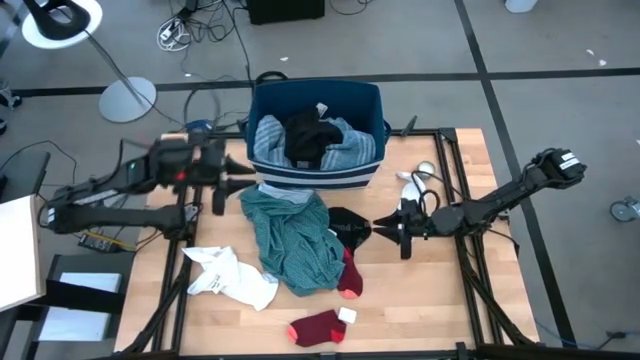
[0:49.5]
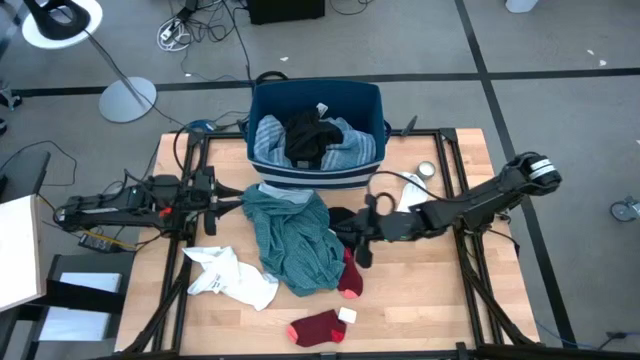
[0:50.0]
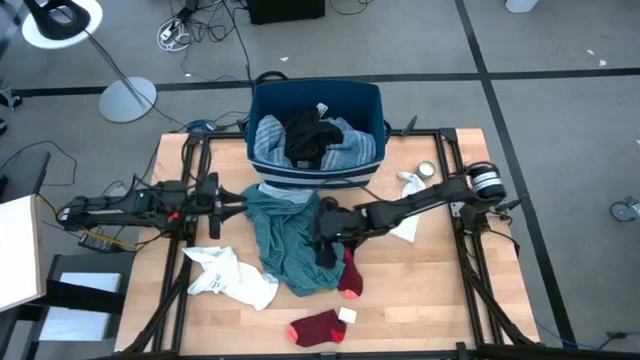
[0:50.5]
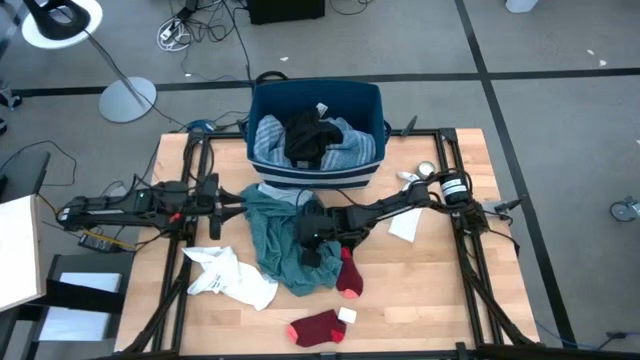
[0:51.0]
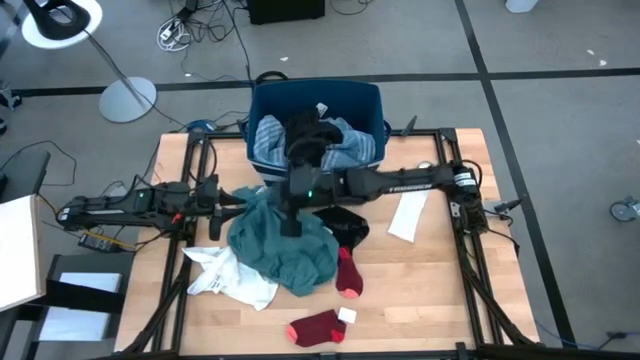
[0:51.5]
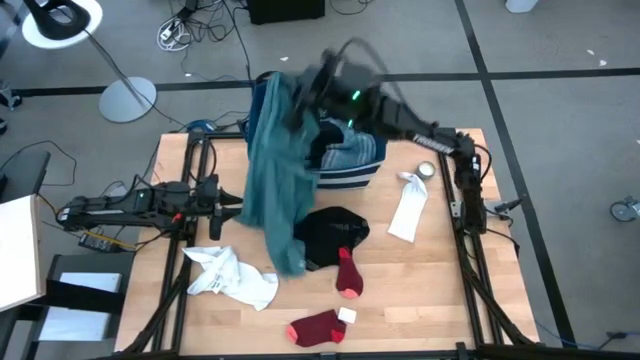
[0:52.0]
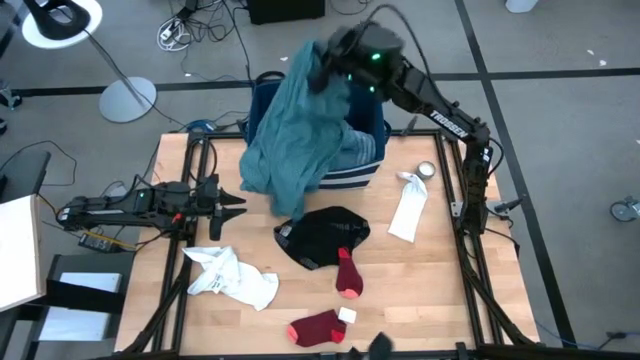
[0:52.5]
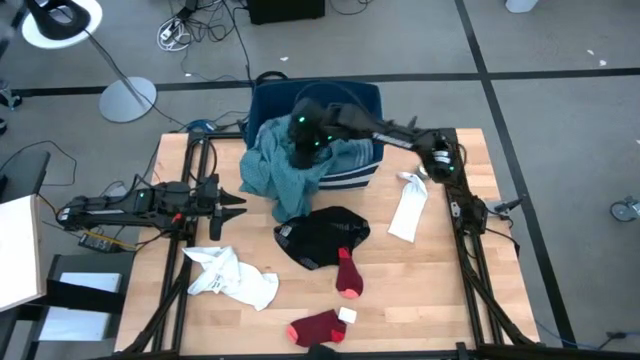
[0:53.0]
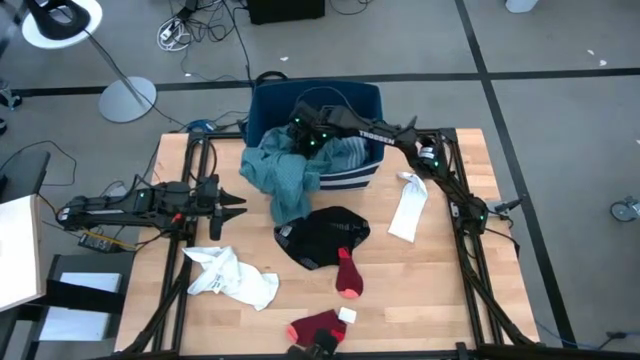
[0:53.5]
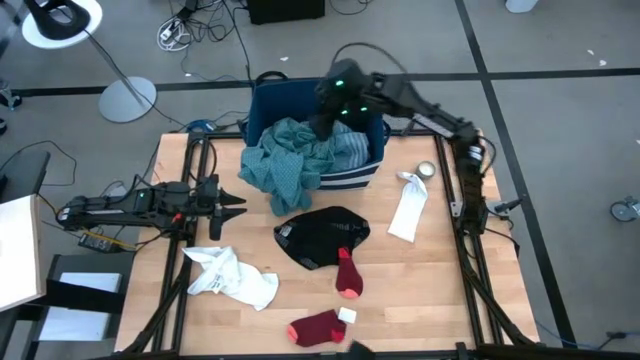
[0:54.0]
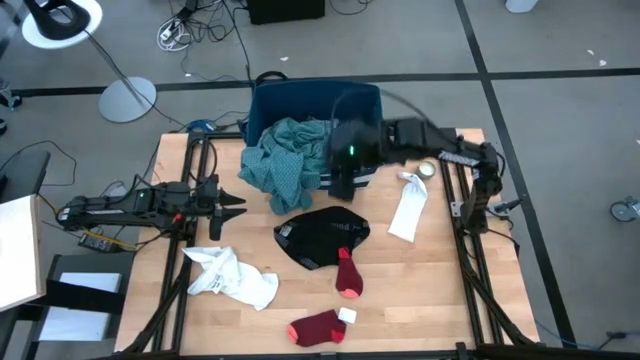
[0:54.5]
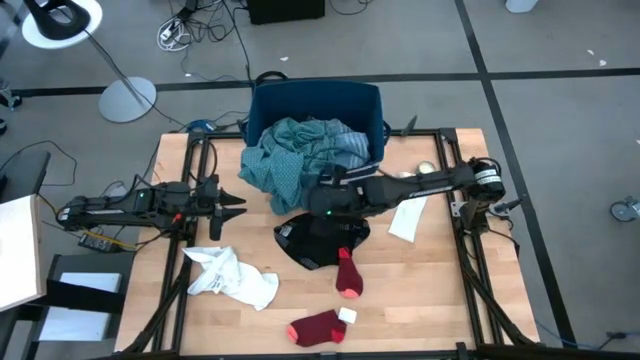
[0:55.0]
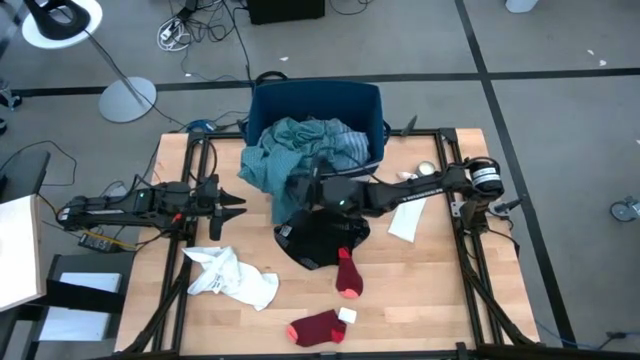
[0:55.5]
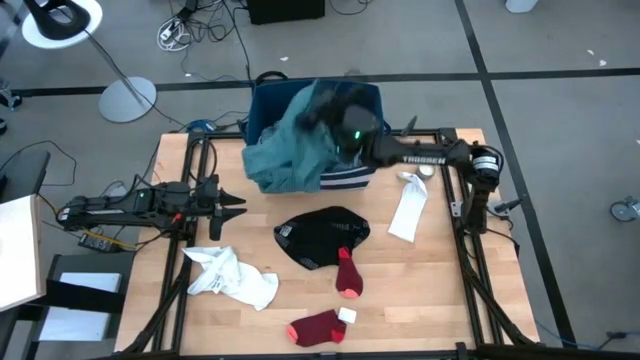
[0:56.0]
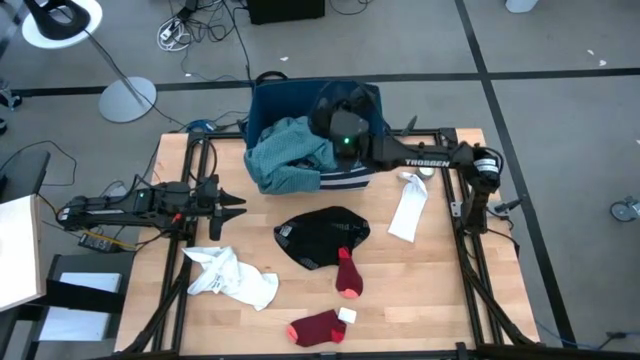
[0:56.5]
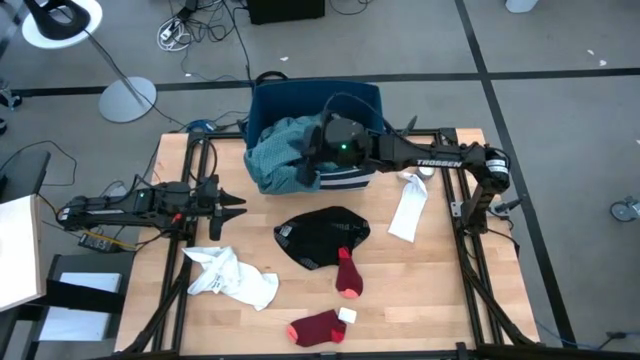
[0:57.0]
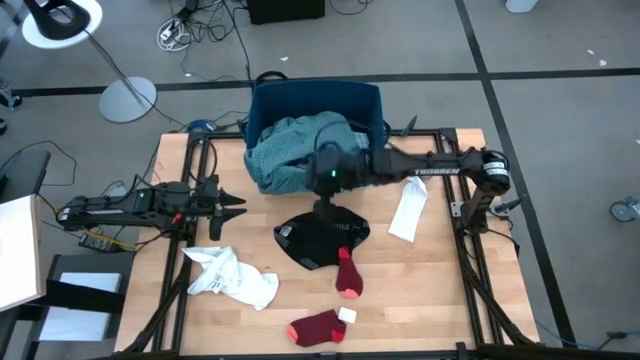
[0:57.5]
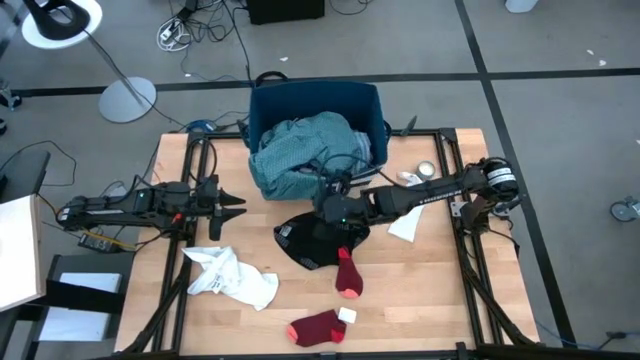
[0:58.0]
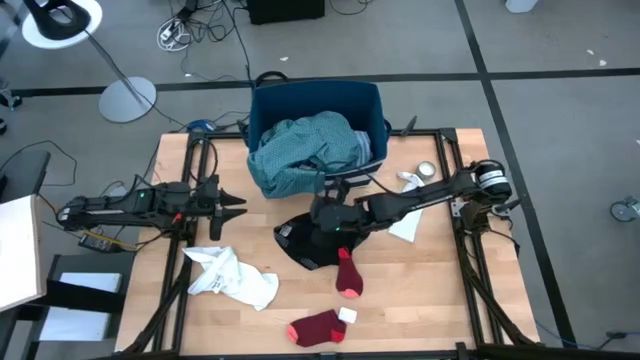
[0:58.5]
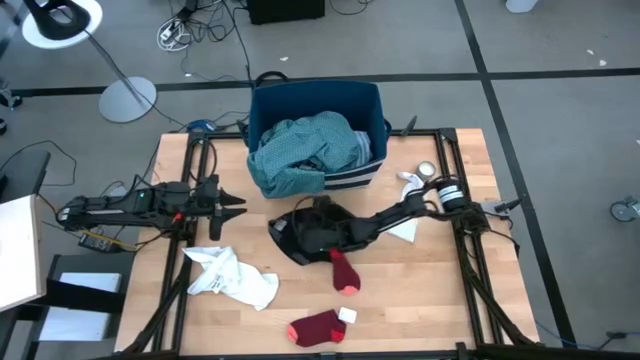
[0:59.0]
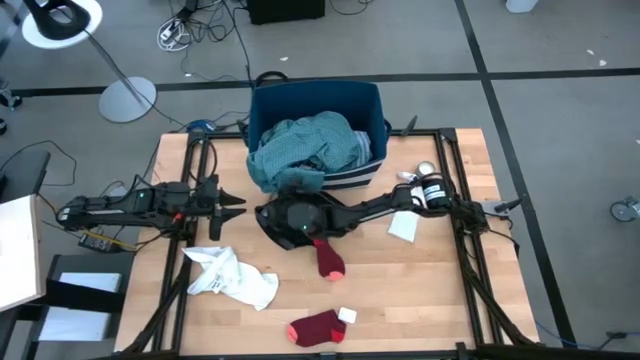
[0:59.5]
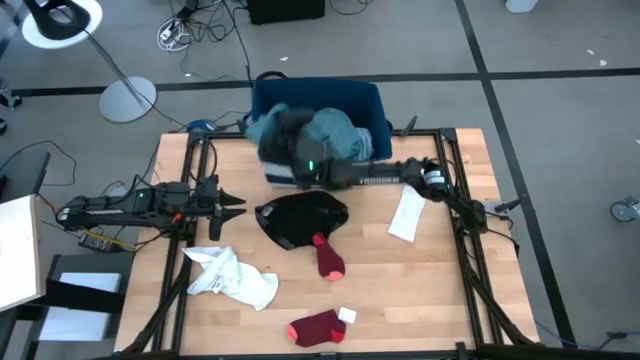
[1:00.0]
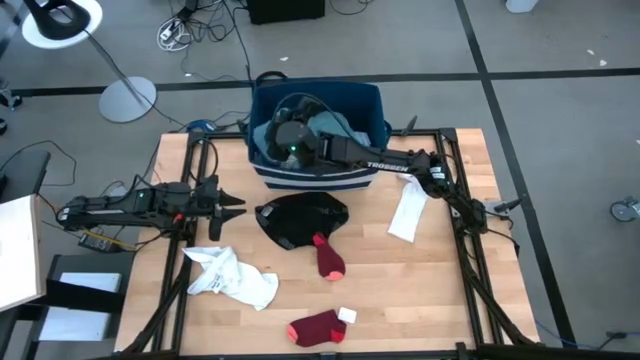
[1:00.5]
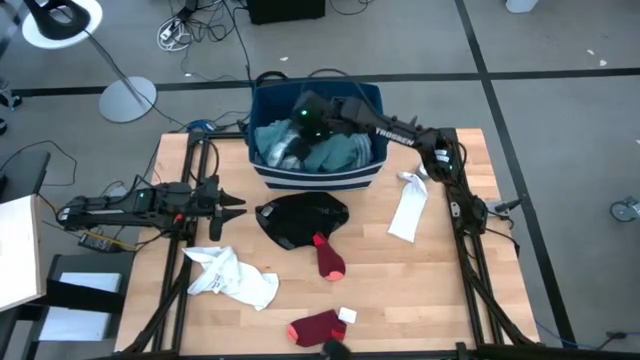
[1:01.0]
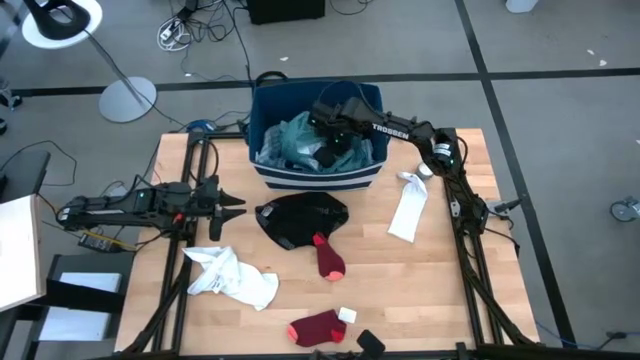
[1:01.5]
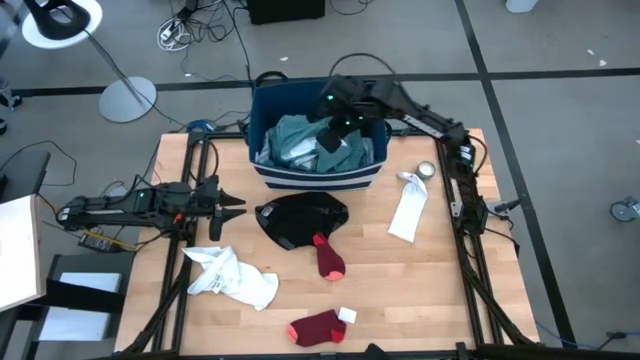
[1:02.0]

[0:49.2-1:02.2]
Task: Sort clothes
Put the green shirt into the blue laundry bin

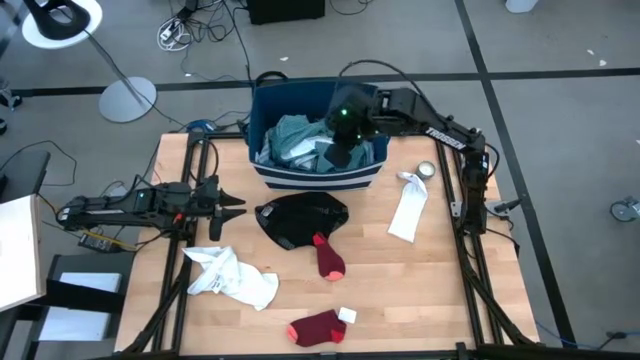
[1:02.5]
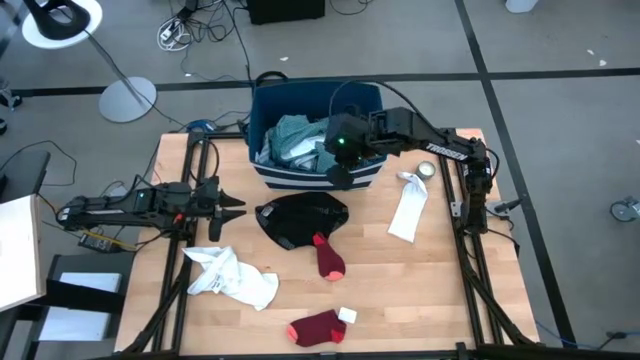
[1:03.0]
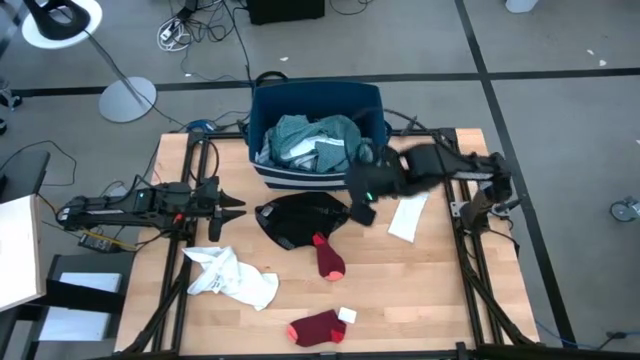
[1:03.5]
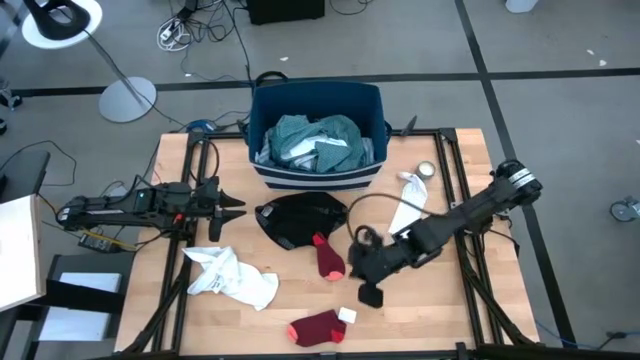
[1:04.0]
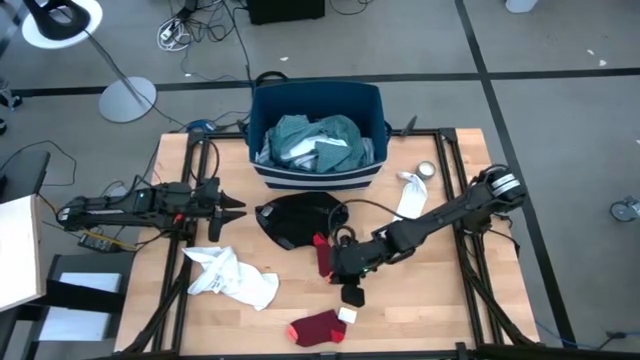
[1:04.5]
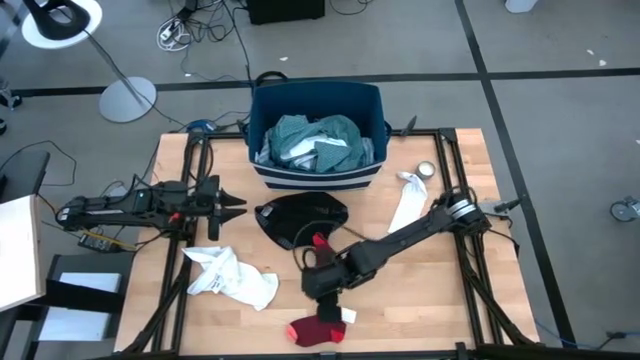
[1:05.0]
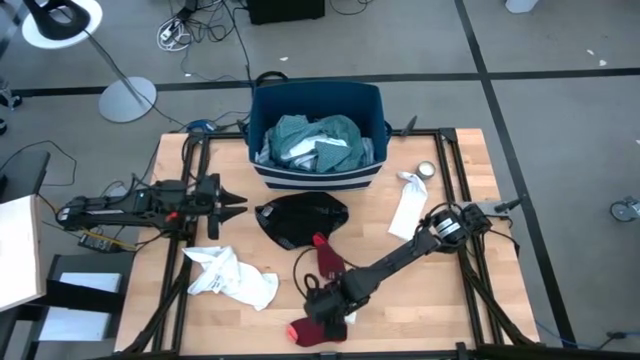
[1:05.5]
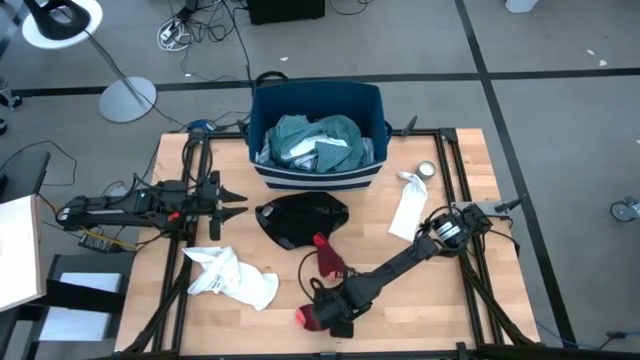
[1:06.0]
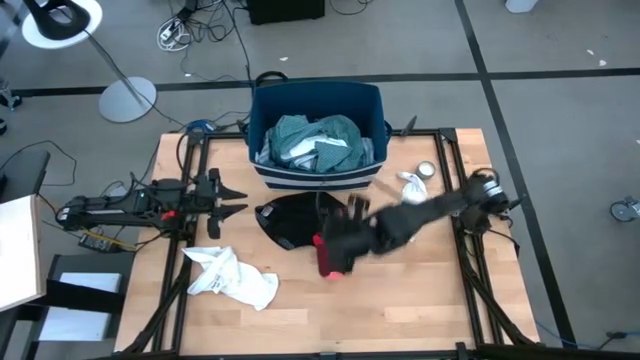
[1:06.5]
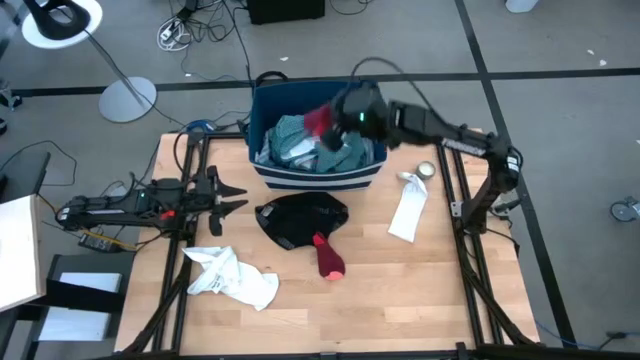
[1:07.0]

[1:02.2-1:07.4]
Put the red sock into the blue laundry bin

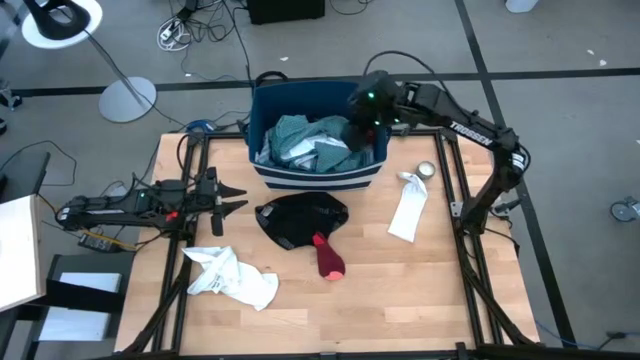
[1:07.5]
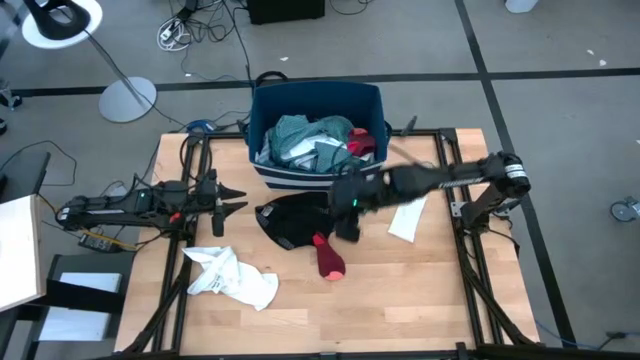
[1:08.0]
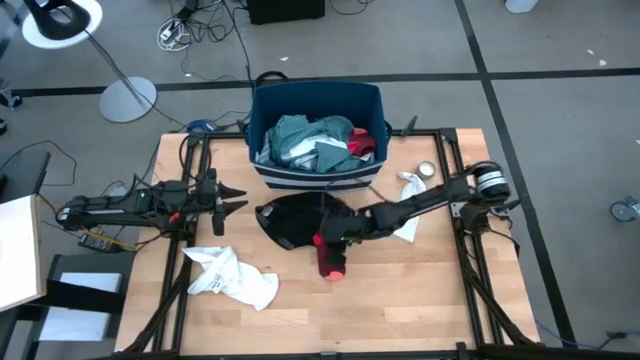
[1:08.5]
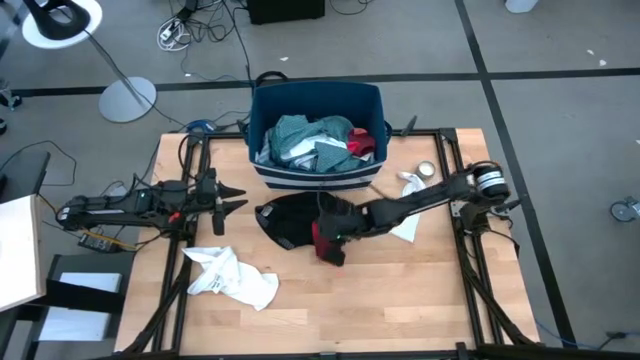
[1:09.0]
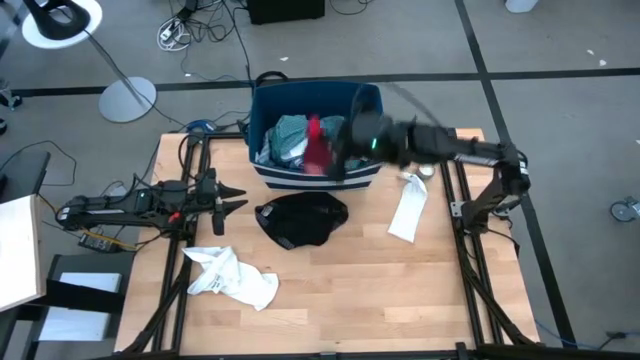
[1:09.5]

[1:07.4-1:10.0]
Put the red sock into the blue laundry bin

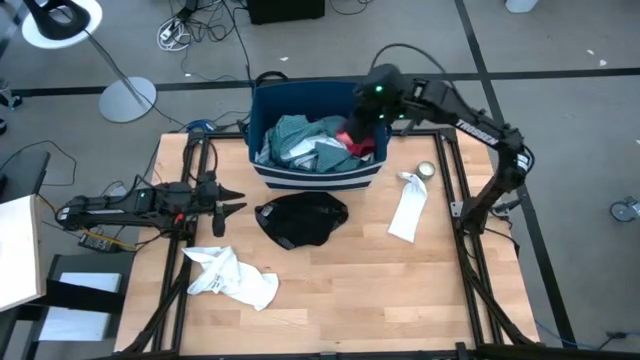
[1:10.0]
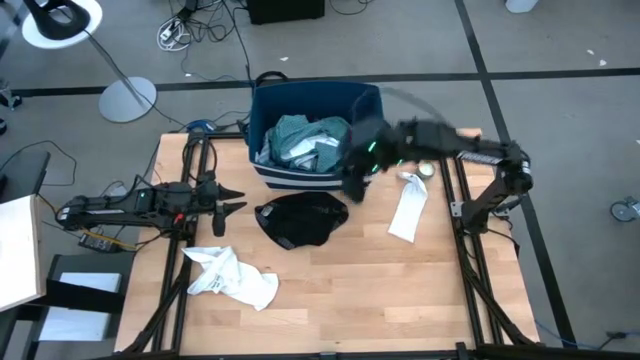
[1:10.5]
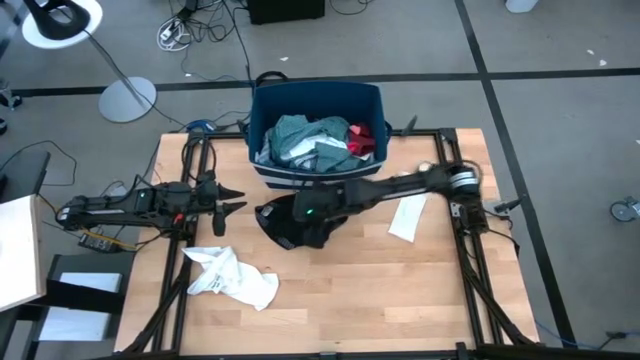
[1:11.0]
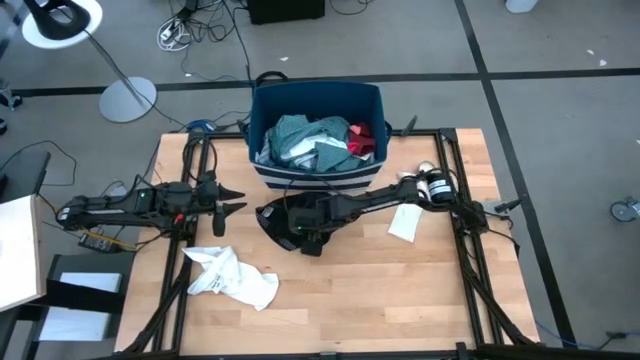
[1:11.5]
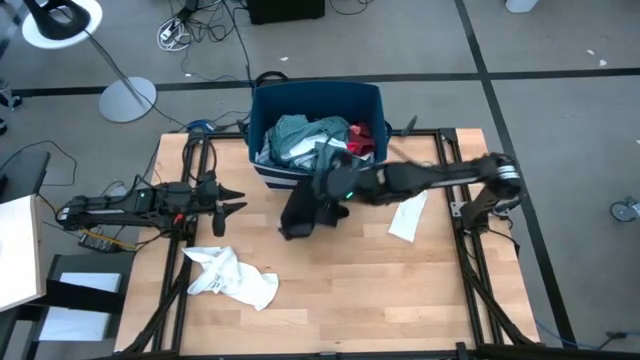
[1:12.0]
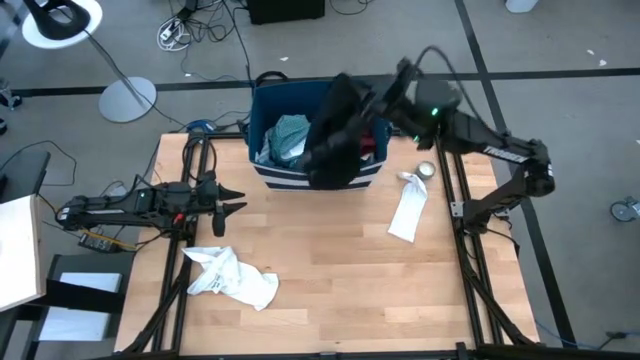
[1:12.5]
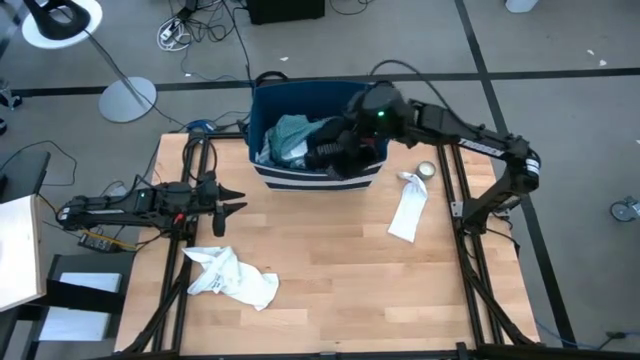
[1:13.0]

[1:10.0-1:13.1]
Put the black boxer into the blue laundry bin
